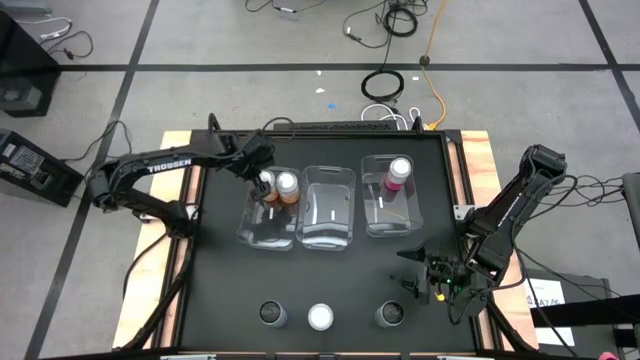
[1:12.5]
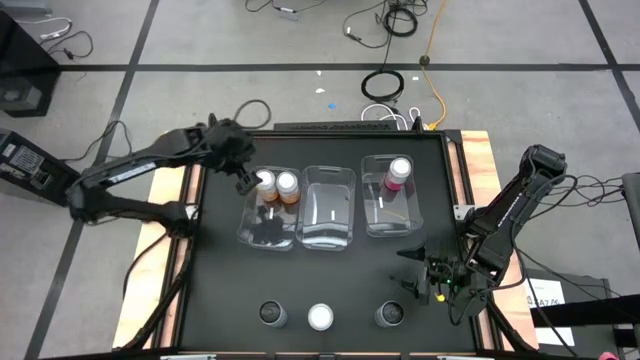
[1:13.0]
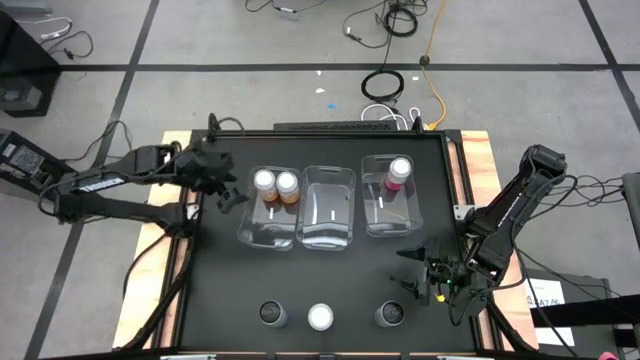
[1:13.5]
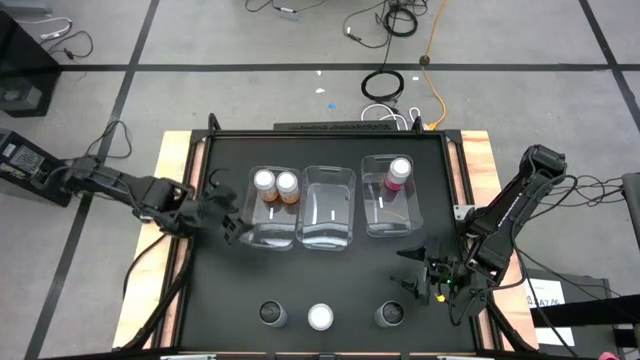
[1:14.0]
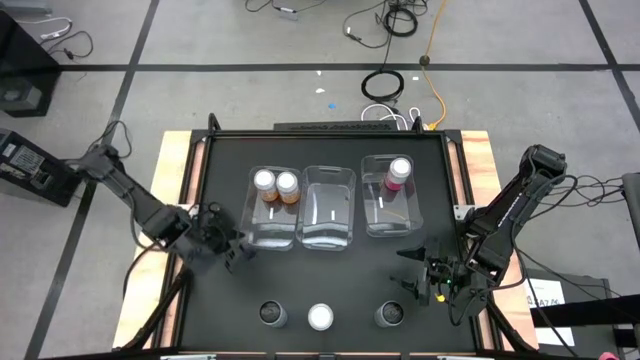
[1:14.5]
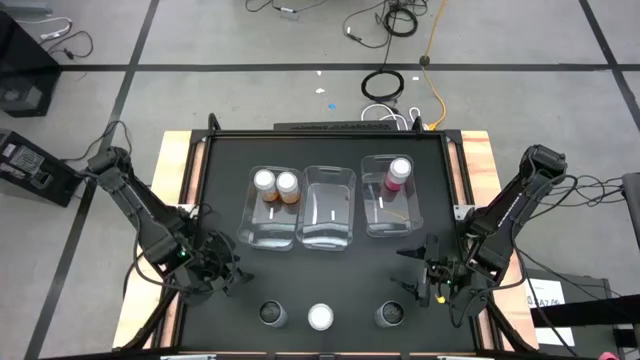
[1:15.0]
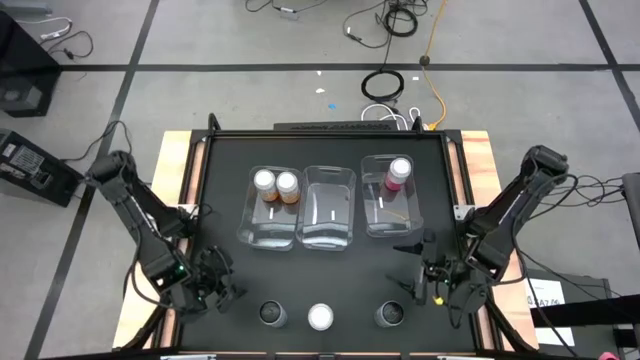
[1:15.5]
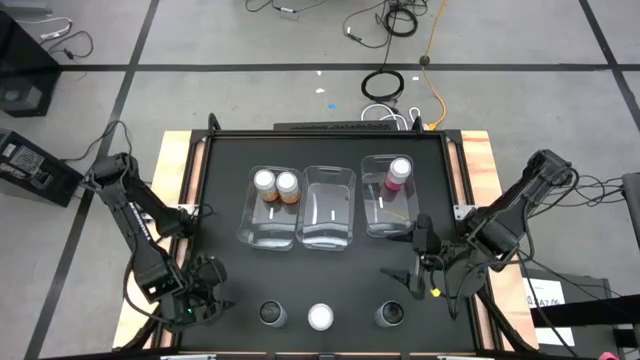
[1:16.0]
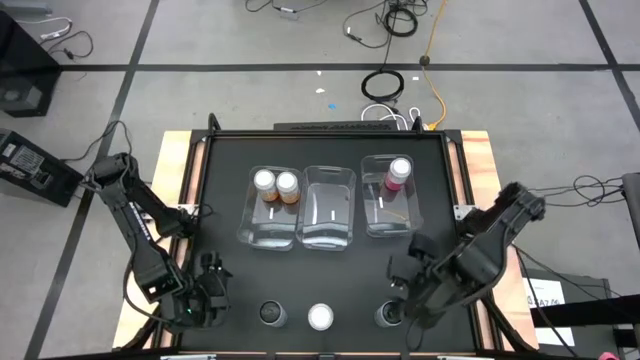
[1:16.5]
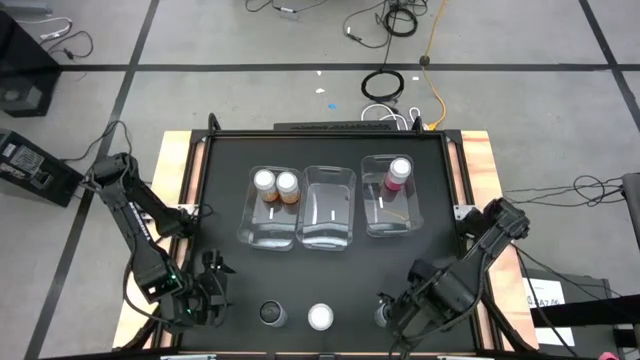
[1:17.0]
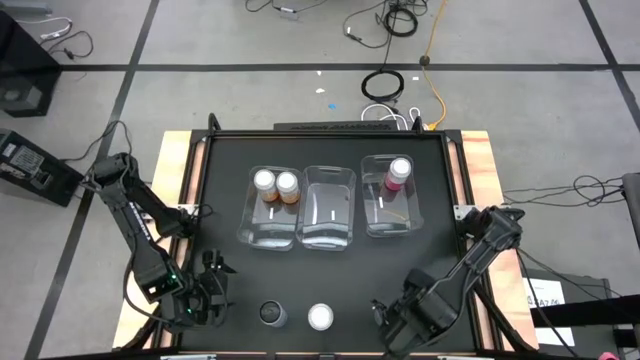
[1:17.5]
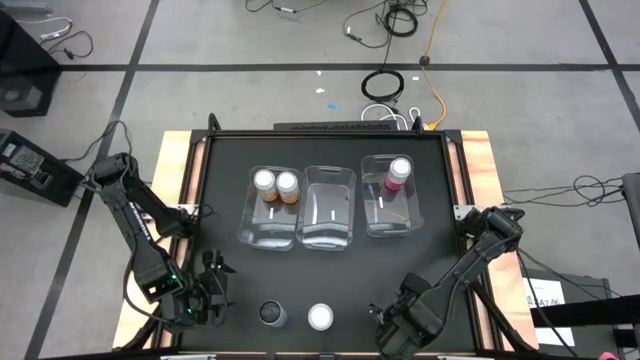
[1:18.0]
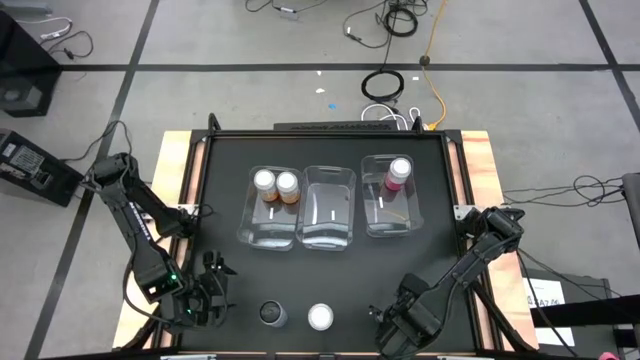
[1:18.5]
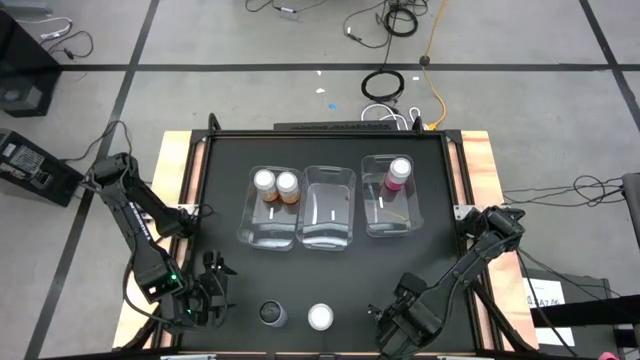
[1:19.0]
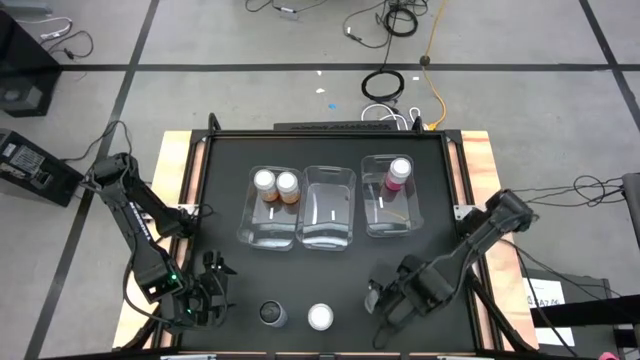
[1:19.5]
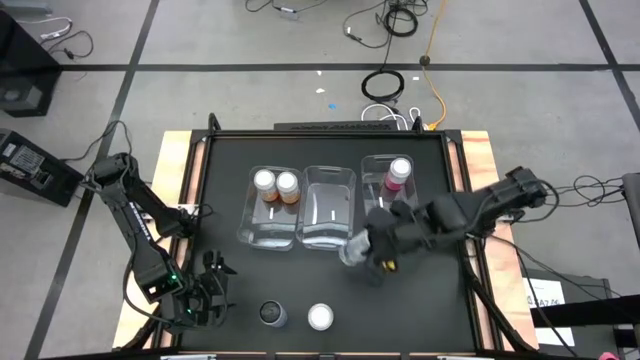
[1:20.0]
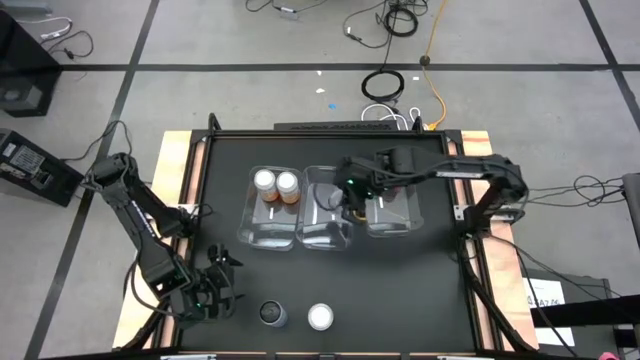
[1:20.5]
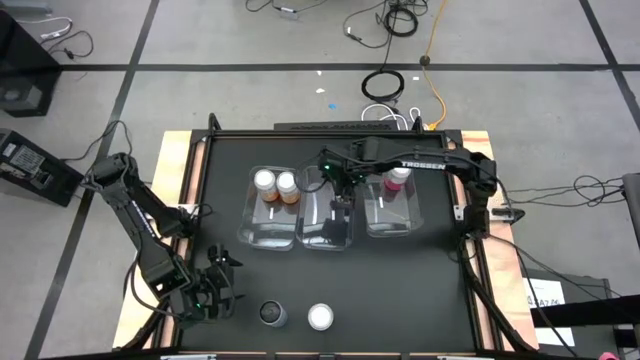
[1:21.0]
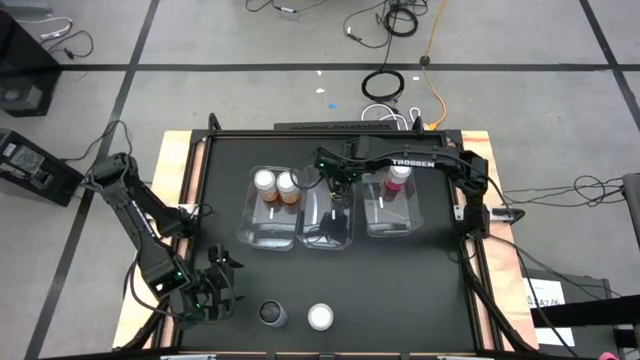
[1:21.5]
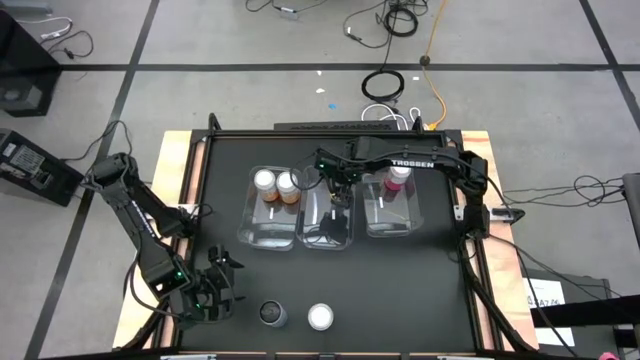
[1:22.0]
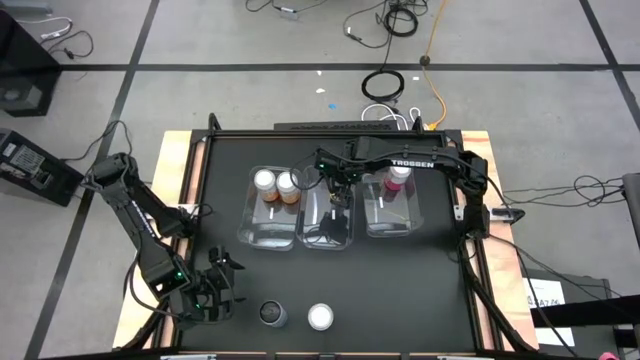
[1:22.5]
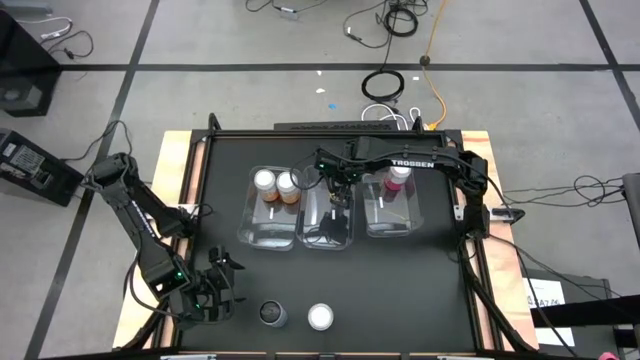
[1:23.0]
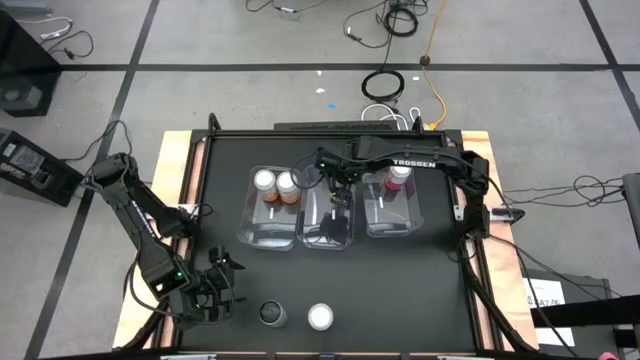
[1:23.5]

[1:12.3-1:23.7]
Task: Sort soda cans
Put the right white/blue soda can into the middle transparent bin

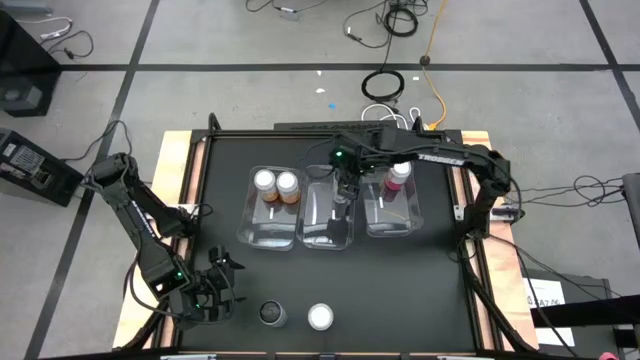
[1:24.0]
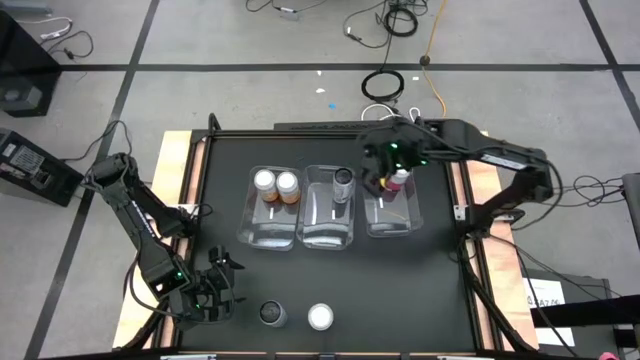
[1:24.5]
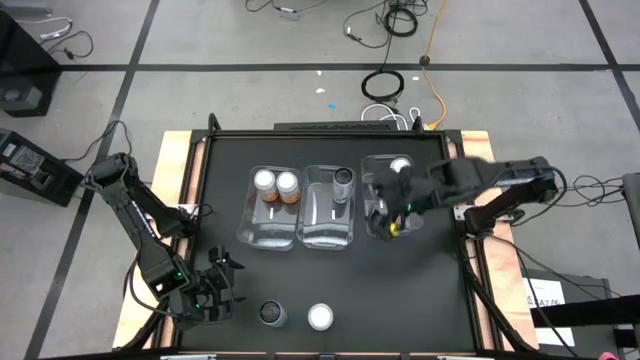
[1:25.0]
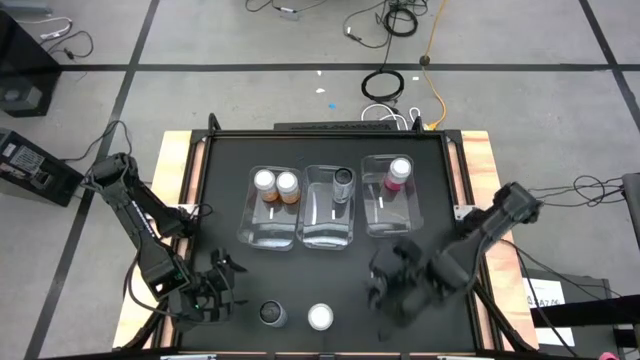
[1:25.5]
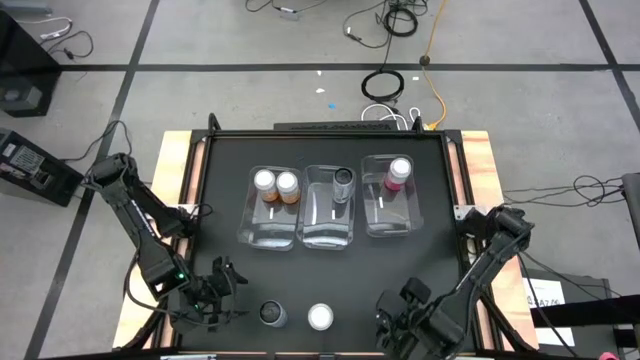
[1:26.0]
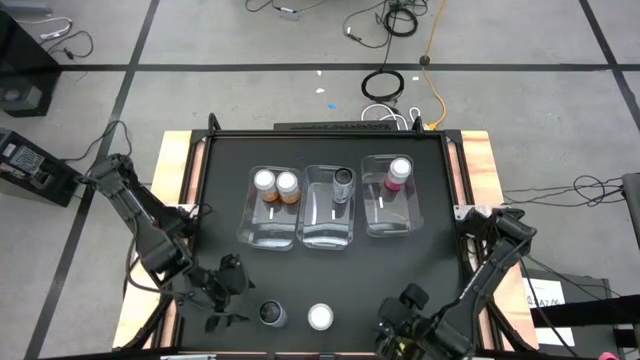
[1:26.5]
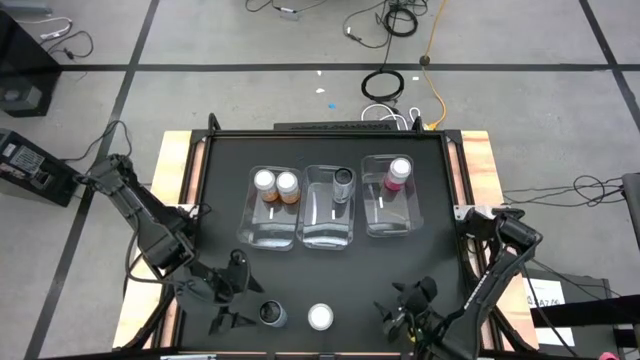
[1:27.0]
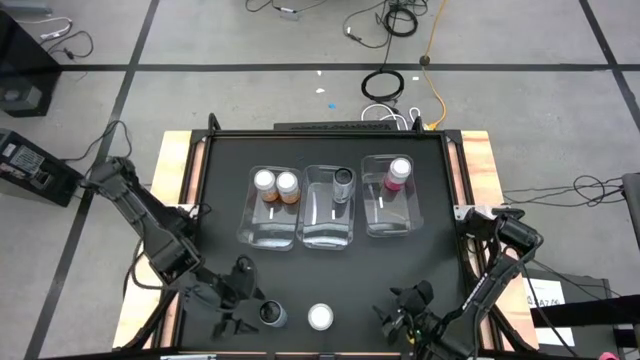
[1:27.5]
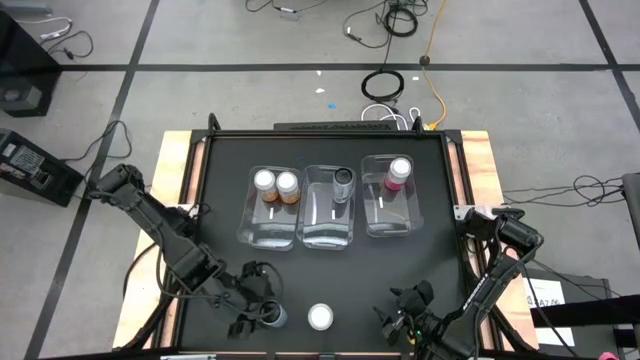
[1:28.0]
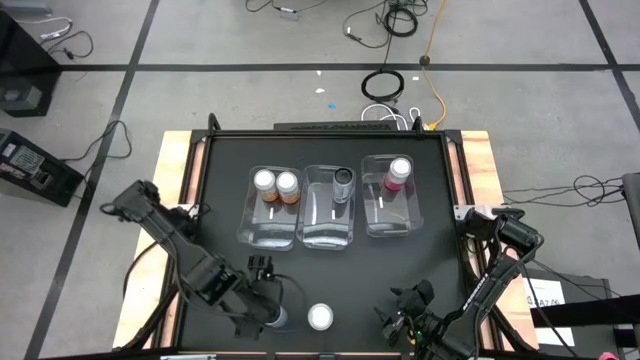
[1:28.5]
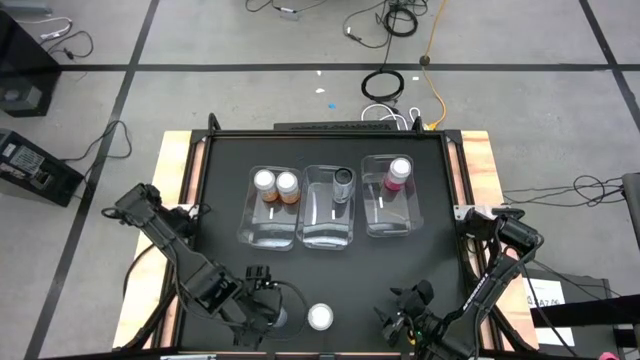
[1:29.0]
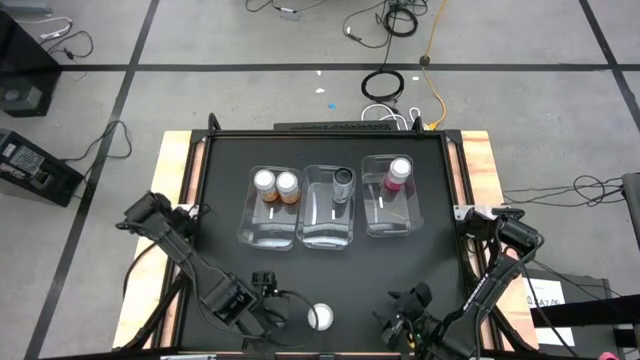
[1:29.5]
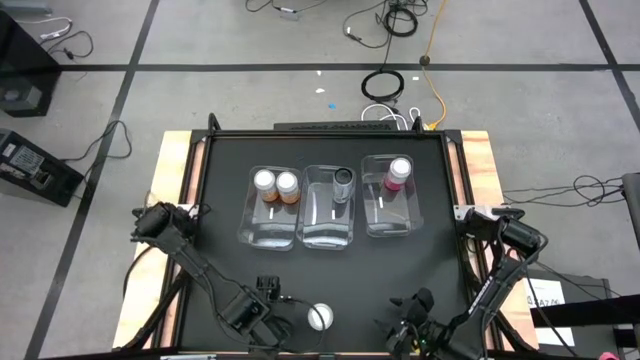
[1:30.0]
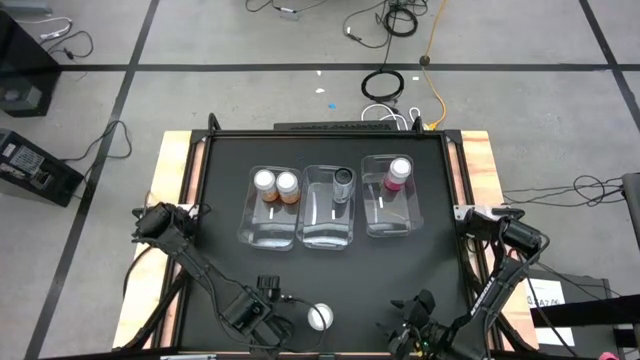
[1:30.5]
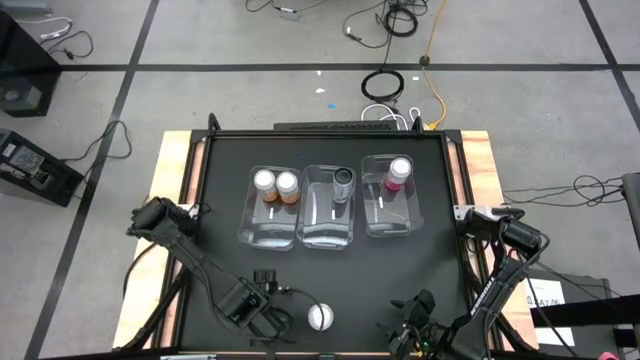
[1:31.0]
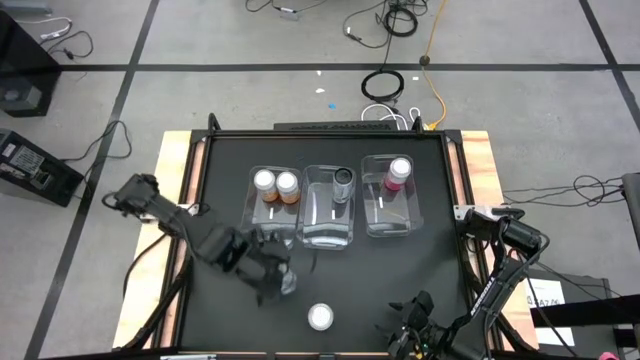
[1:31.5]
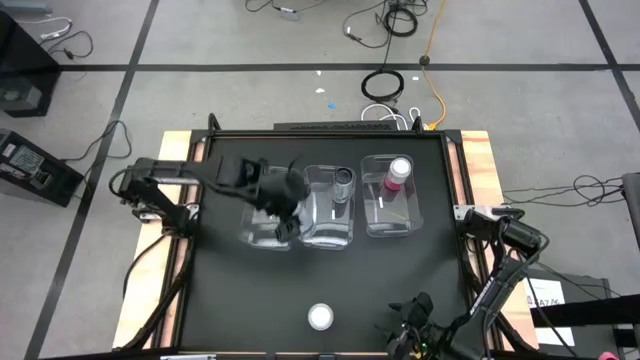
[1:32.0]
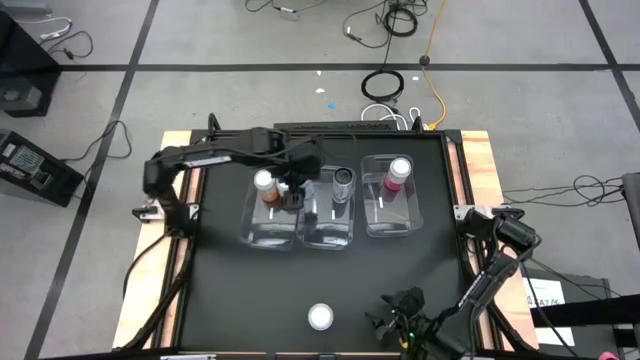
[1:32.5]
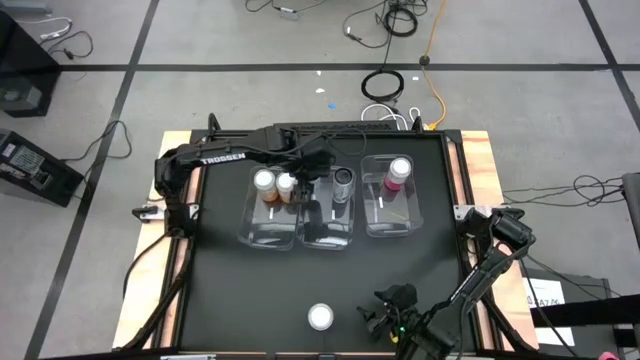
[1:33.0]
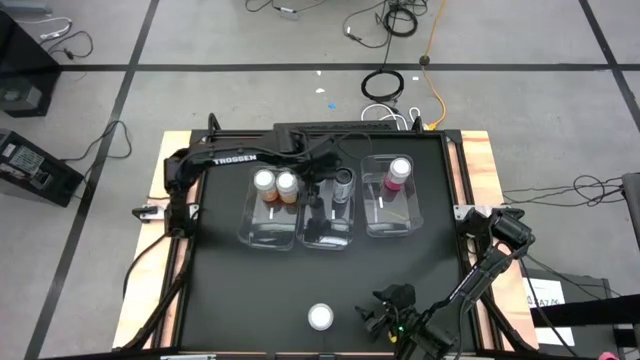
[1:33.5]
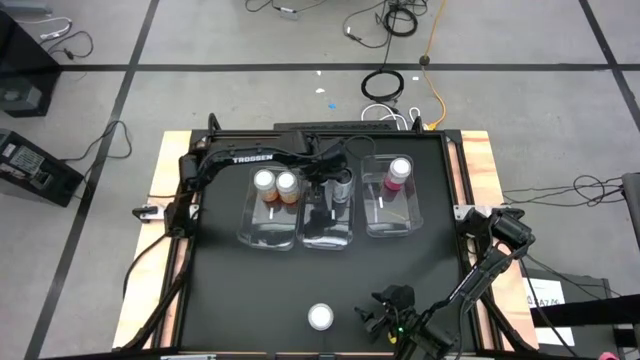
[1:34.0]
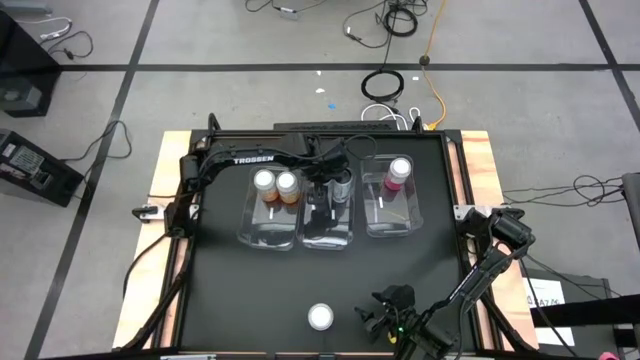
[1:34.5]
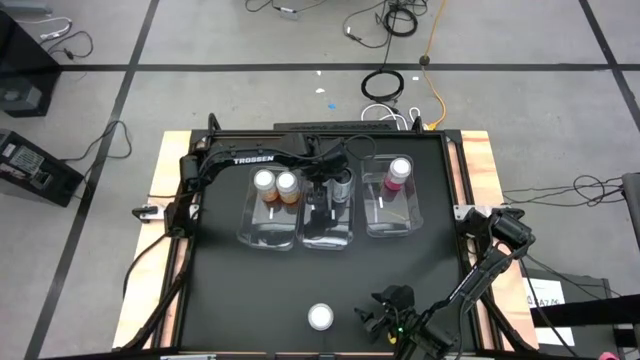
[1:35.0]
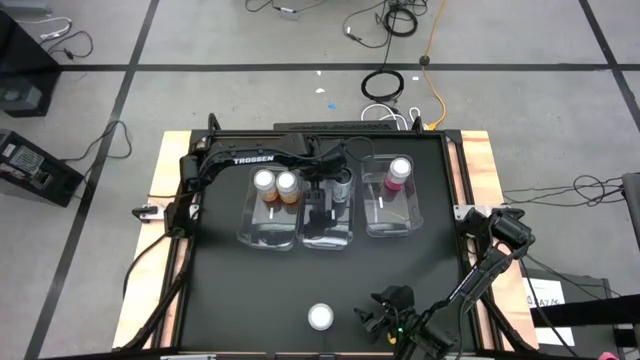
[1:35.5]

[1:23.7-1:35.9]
Put the left white/blue soda can into the middle transparent bin
